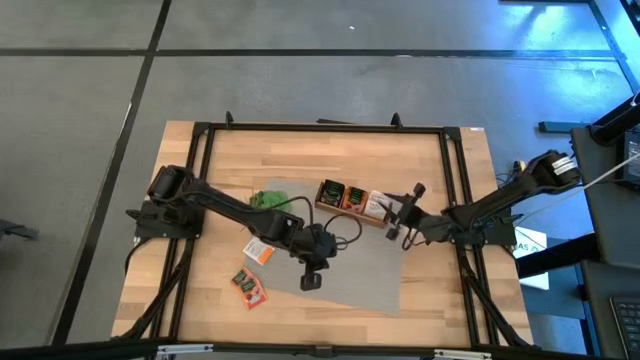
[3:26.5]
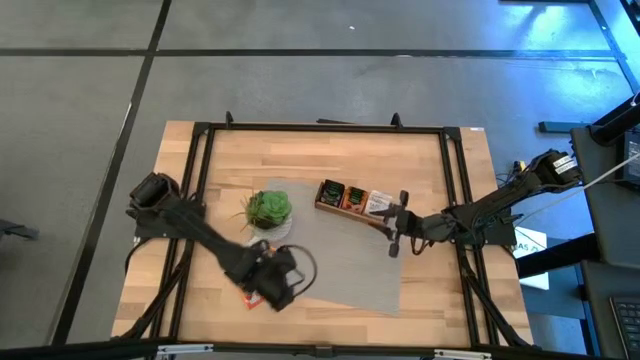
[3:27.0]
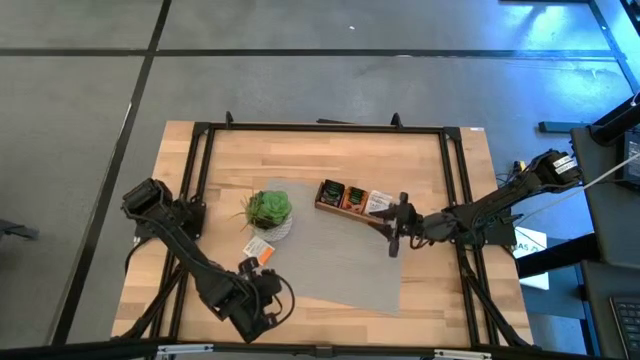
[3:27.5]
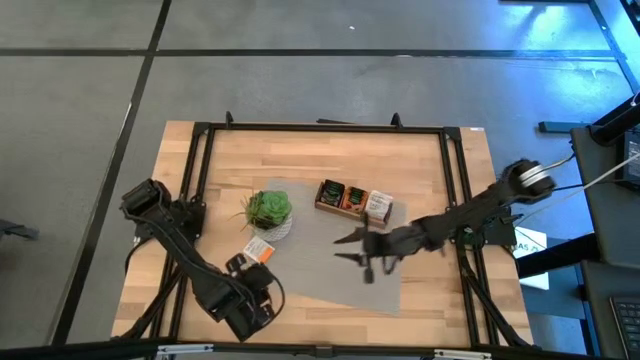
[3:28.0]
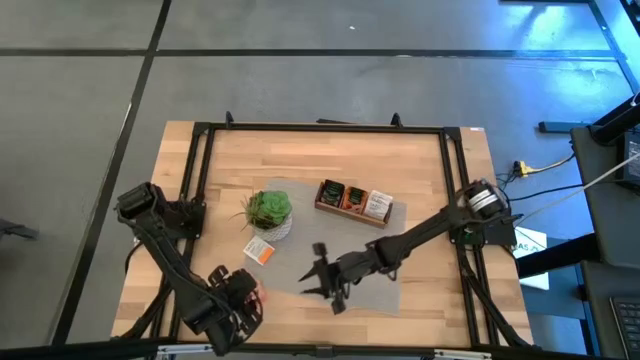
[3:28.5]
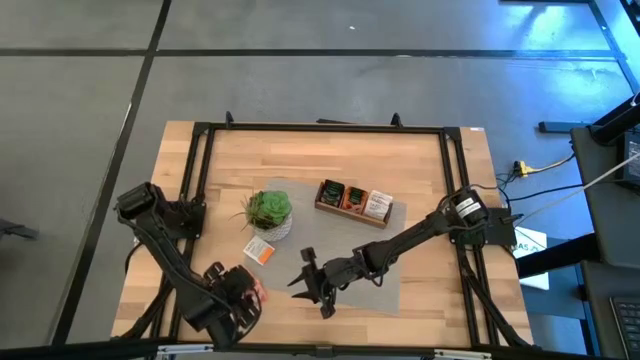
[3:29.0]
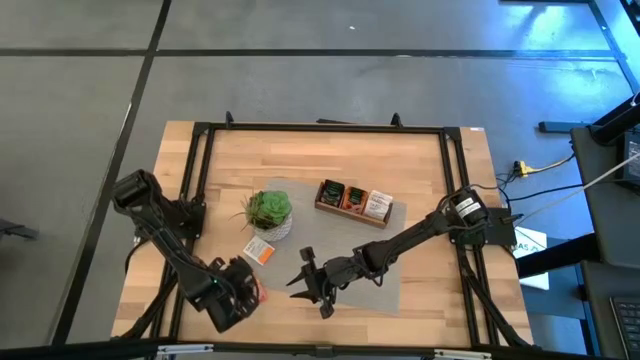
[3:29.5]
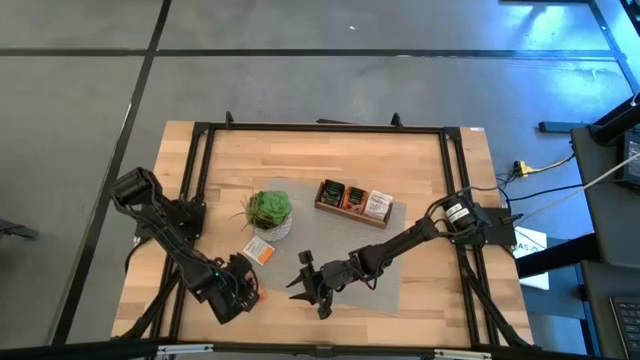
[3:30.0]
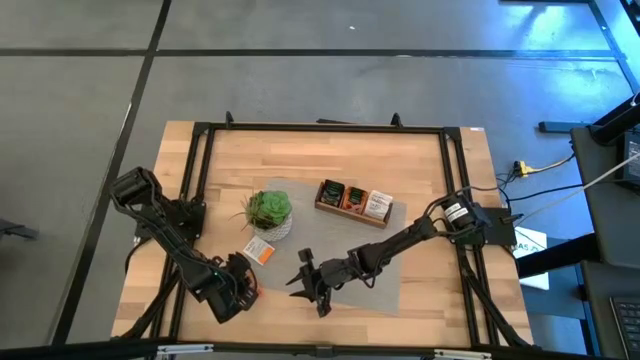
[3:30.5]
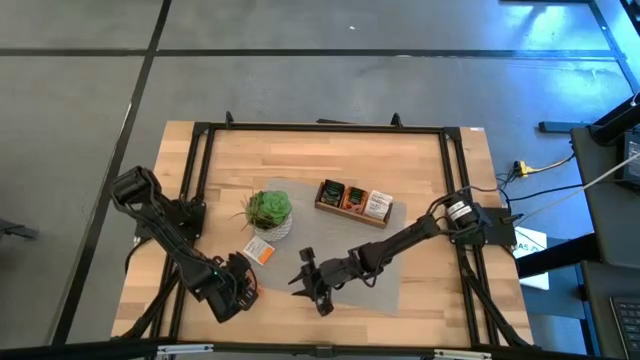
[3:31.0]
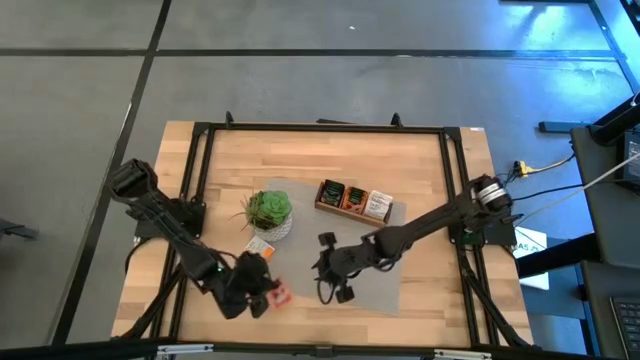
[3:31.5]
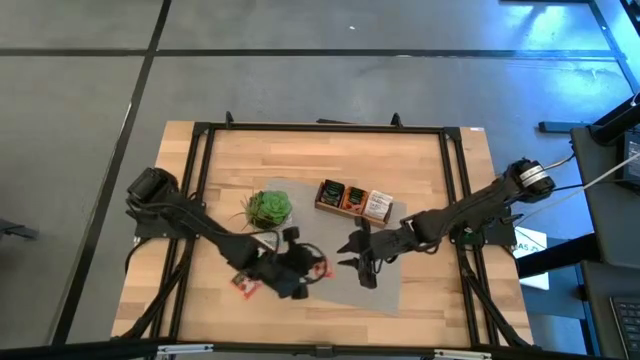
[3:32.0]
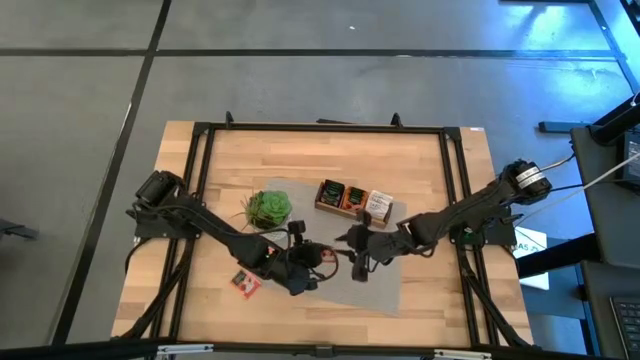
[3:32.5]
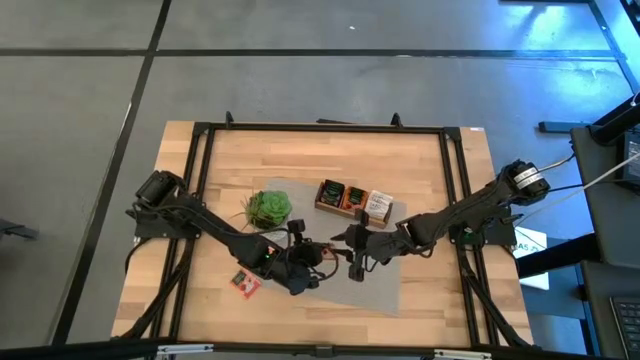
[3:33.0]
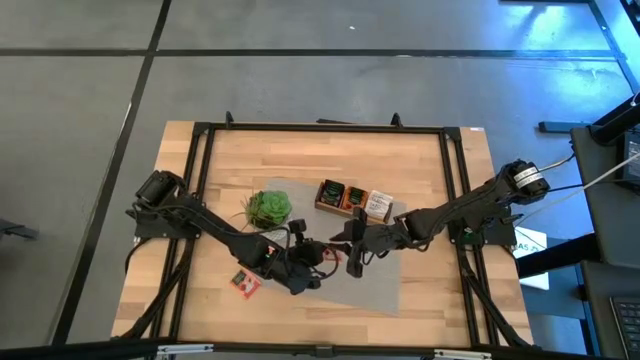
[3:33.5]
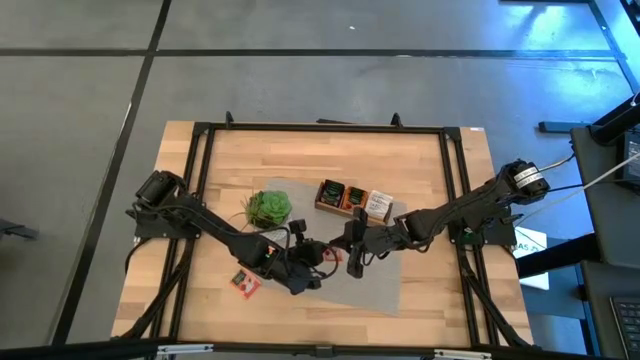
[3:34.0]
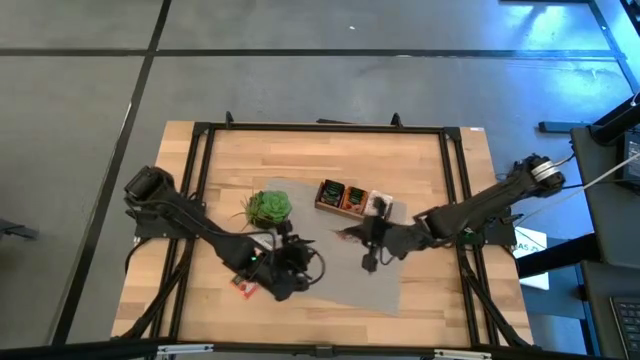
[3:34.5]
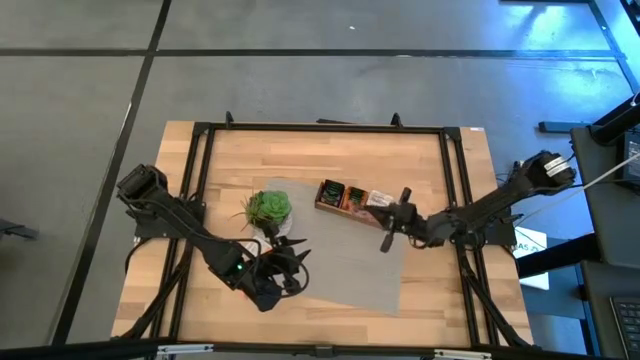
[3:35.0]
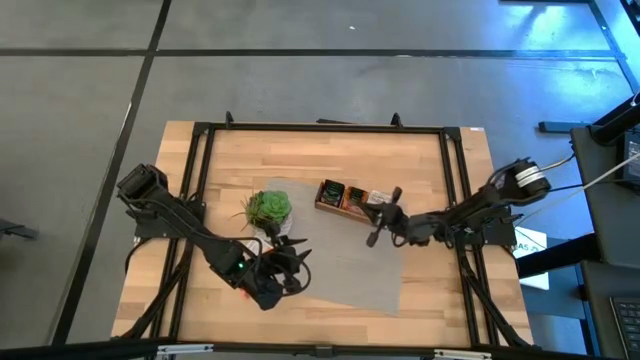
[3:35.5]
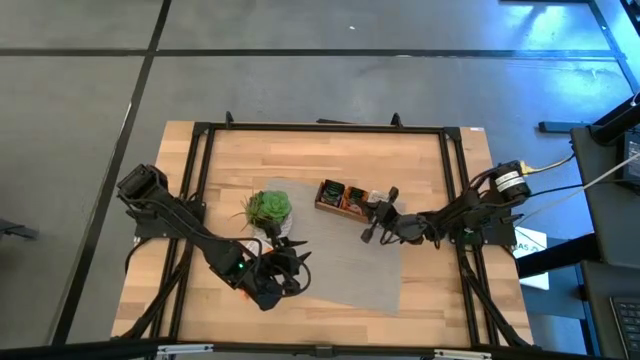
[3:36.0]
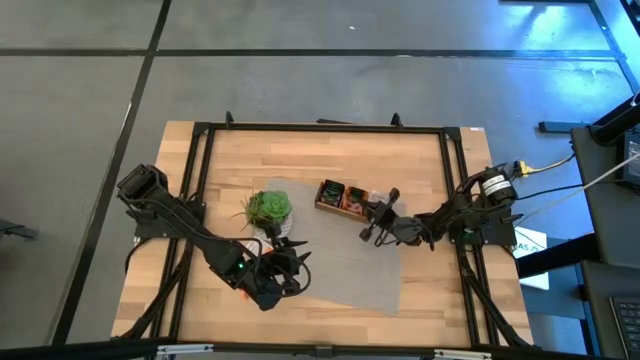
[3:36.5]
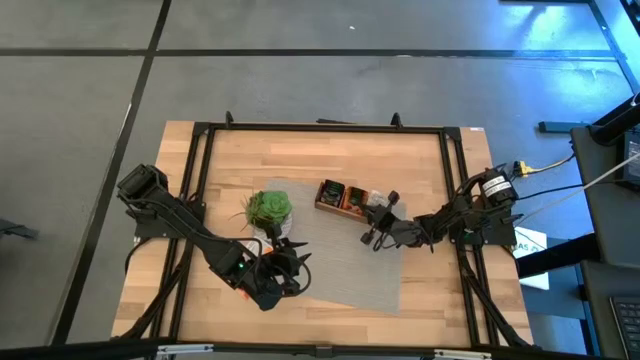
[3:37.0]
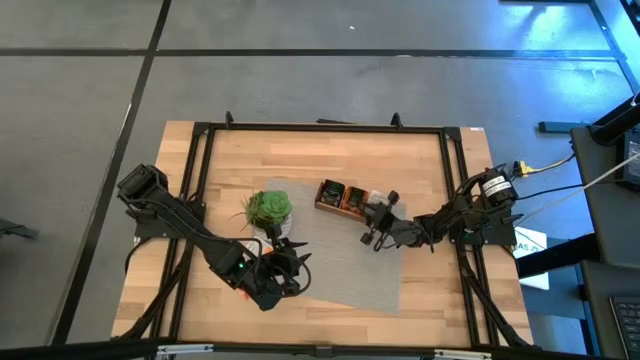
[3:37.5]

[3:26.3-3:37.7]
Task: Pick & Place Tea
Put the orange tea bag into the middle section of the wooden organizer

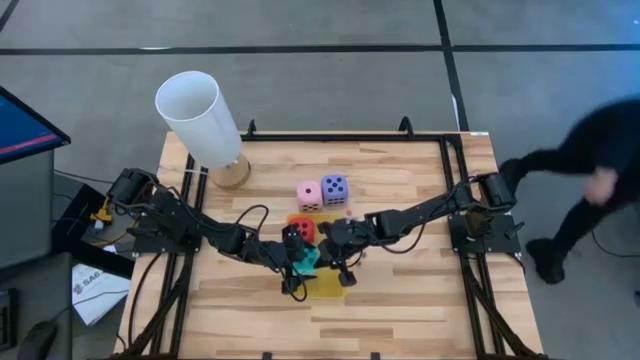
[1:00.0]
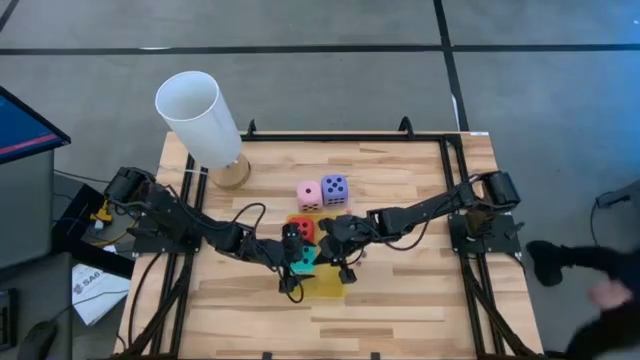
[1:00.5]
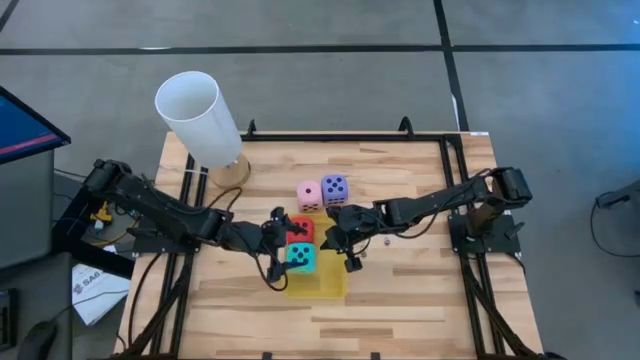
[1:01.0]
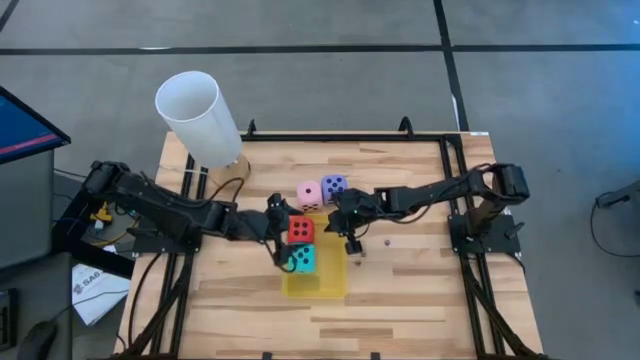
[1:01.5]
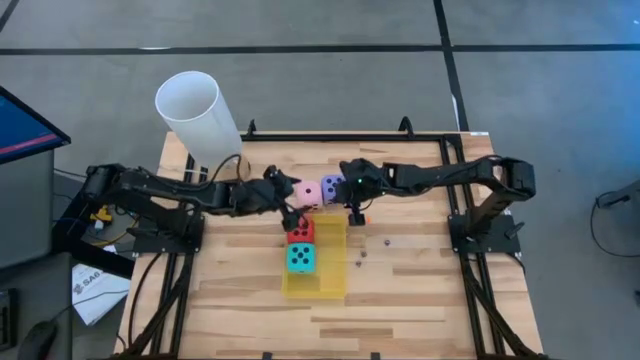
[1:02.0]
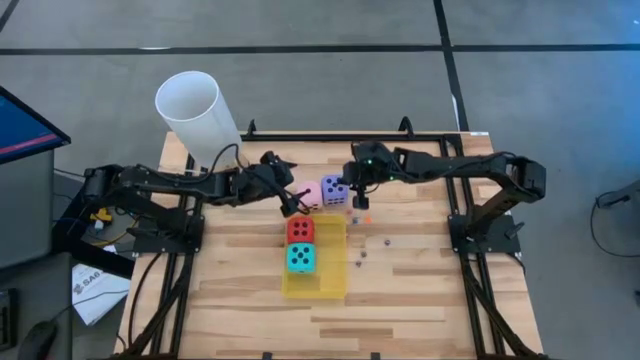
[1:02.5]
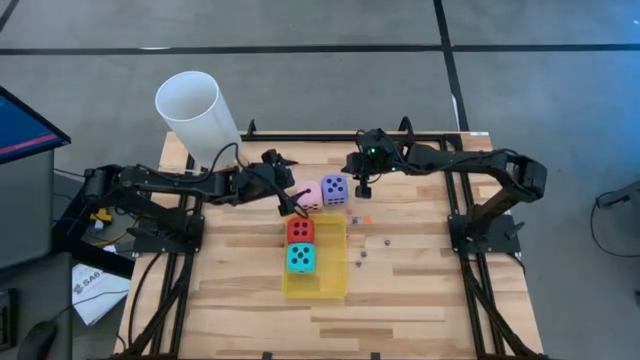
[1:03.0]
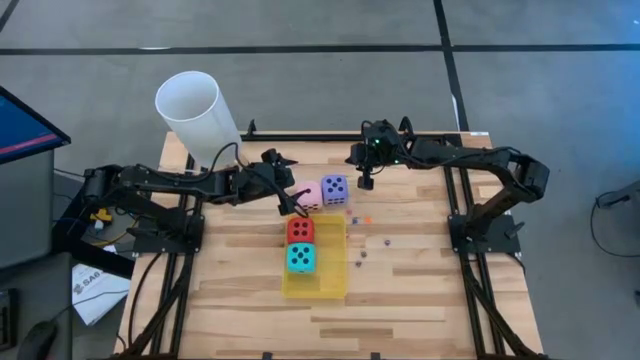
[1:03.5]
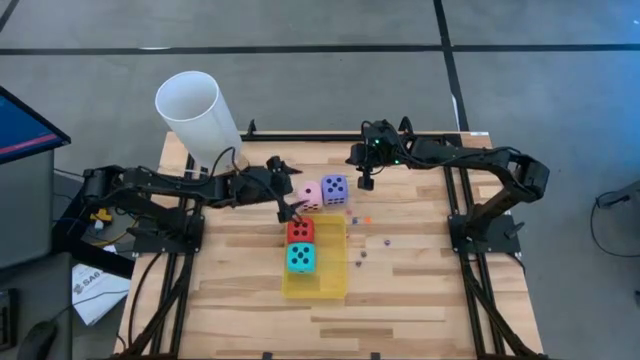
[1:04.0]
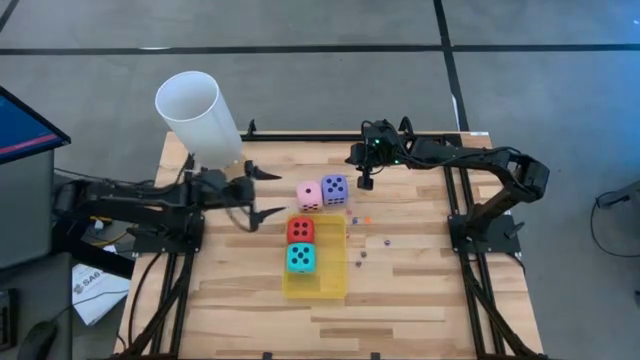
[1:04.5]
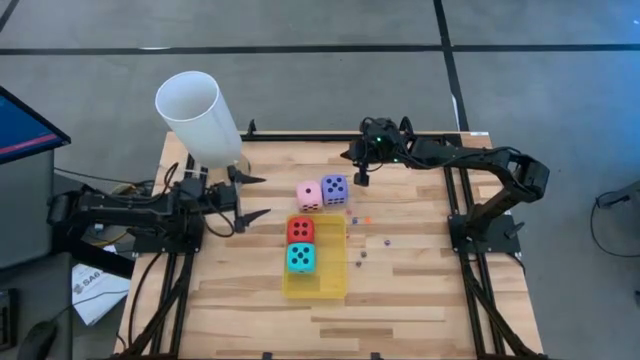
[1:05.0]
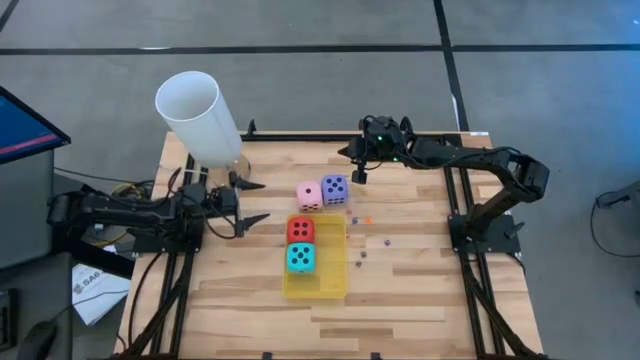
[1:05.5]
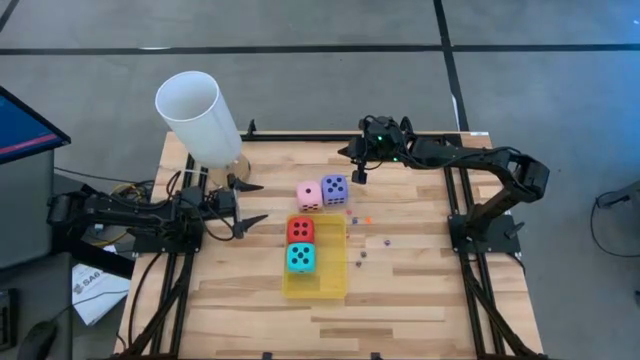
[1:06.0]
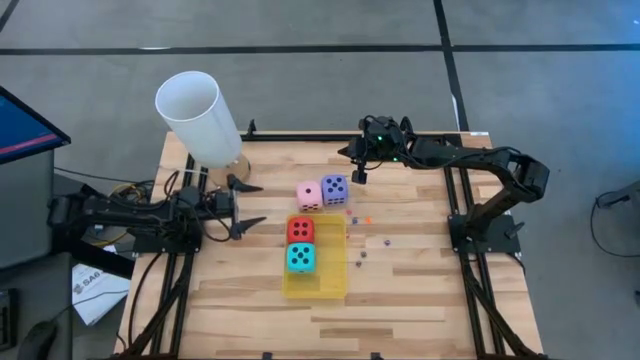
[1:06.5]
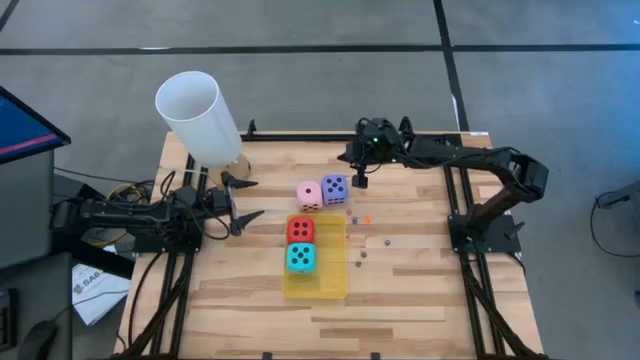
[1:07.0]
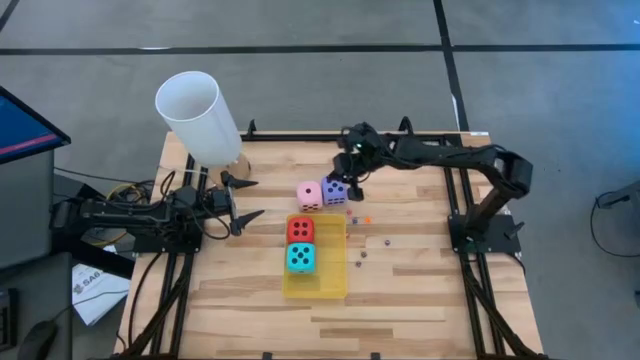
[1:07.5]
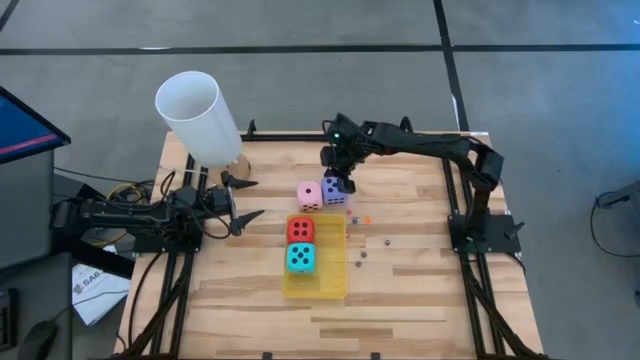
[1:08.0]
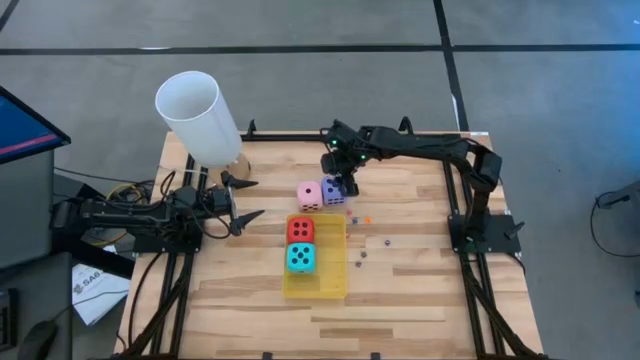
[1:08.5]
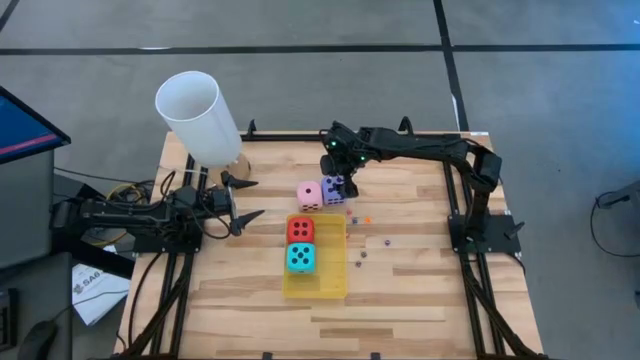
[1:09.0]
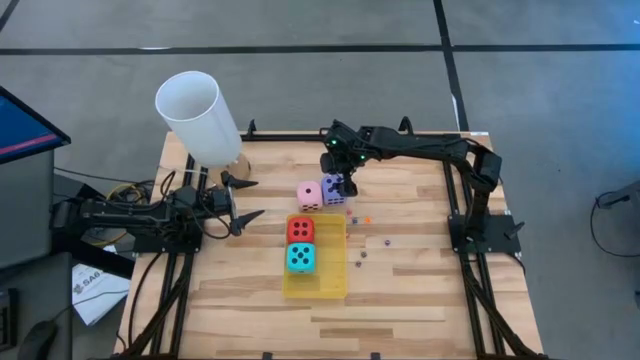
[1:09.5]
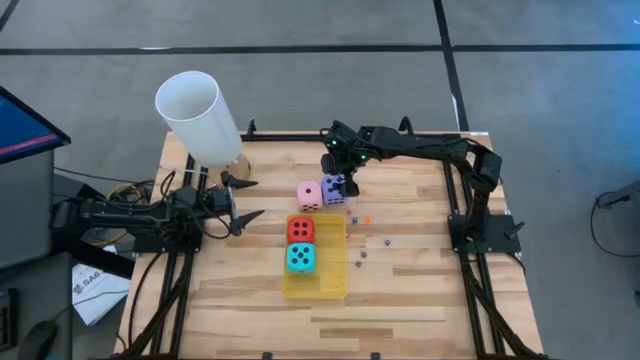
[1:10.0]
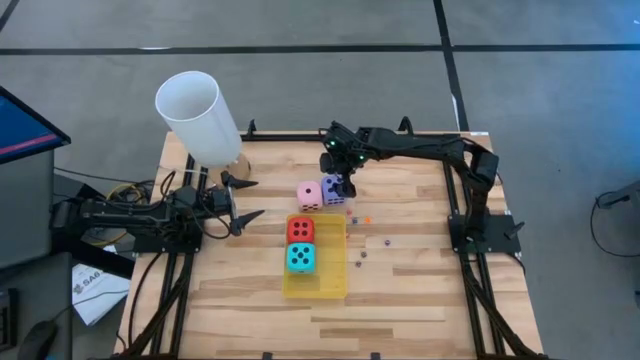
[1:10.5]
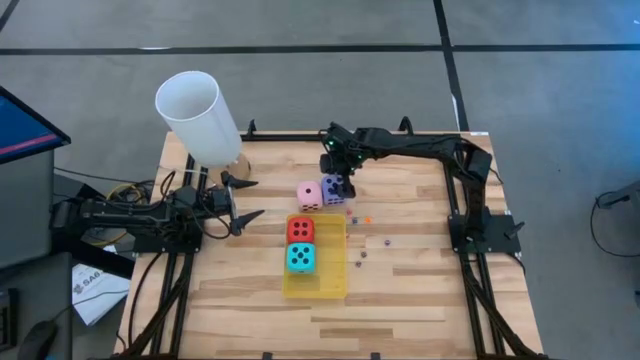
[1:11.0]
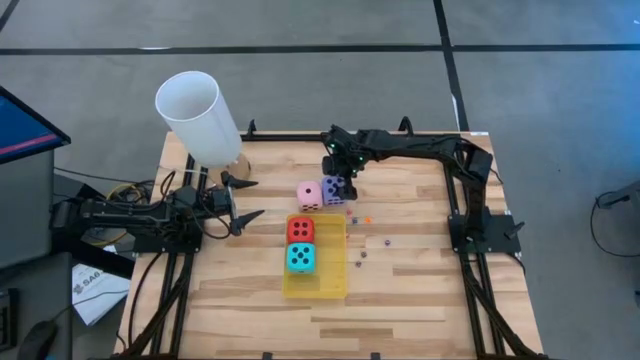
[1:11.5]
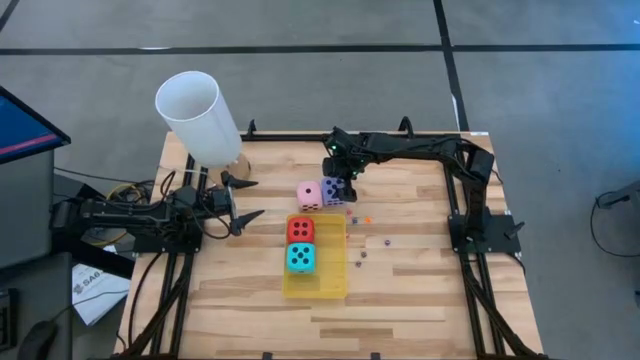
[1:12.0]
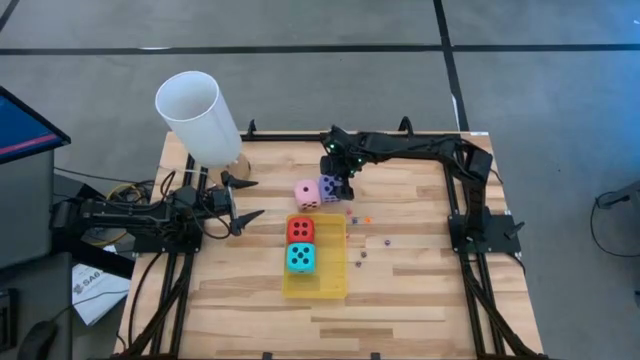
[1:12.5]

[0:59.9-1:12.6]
Task: Pick & Place Dice
Put the violet die into the yellow bin
